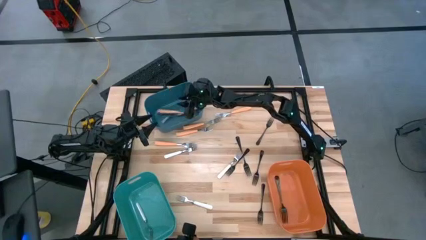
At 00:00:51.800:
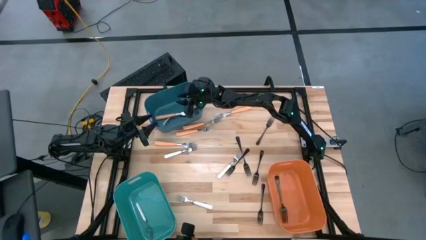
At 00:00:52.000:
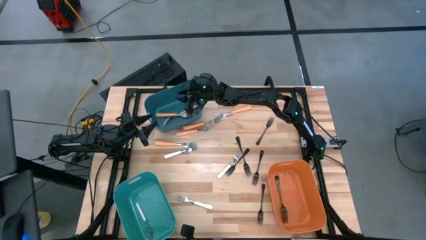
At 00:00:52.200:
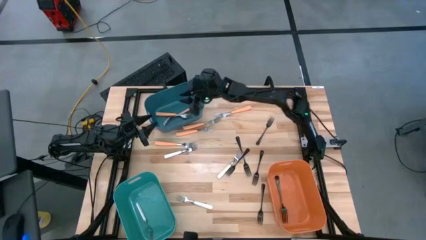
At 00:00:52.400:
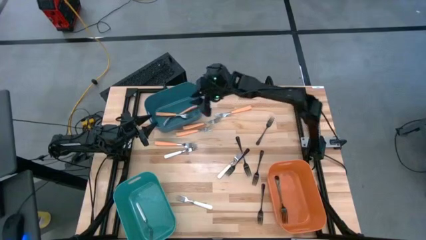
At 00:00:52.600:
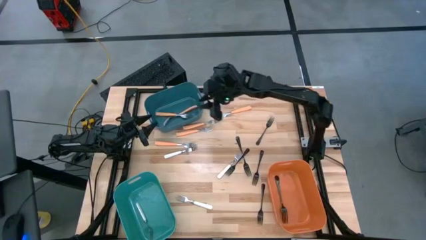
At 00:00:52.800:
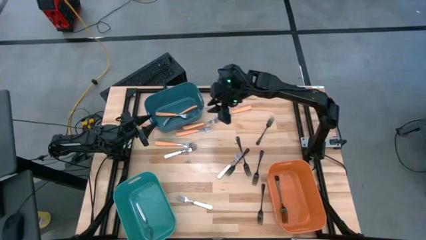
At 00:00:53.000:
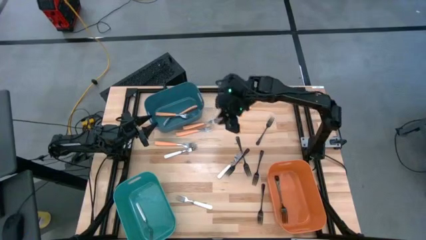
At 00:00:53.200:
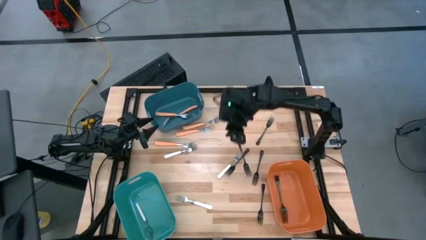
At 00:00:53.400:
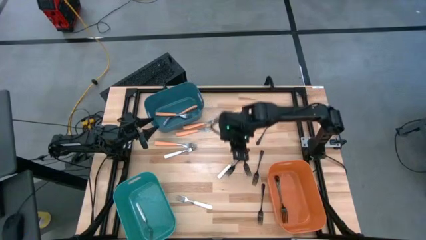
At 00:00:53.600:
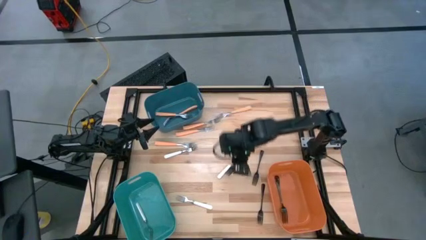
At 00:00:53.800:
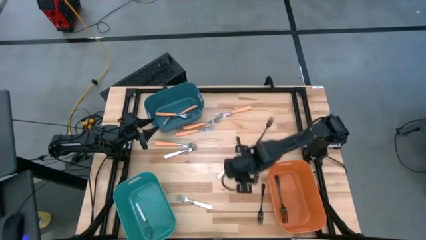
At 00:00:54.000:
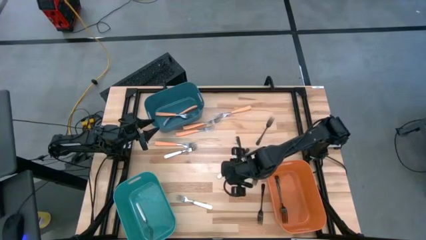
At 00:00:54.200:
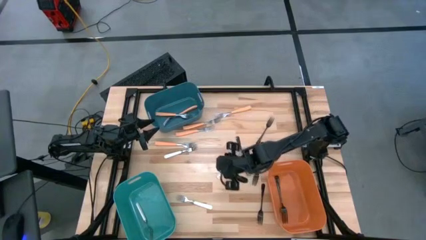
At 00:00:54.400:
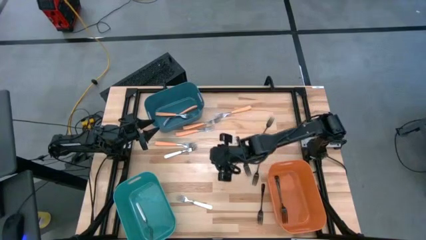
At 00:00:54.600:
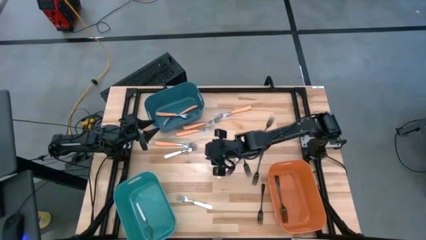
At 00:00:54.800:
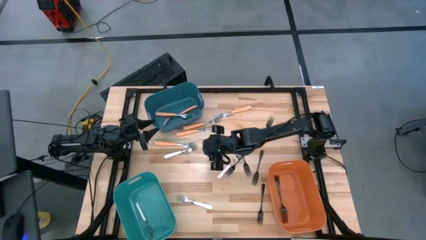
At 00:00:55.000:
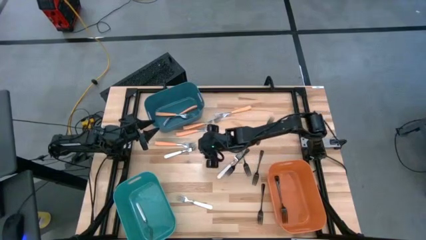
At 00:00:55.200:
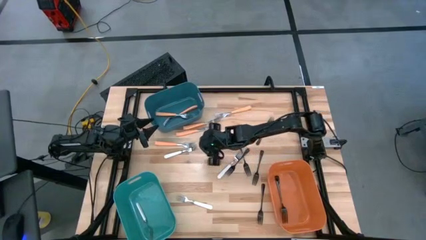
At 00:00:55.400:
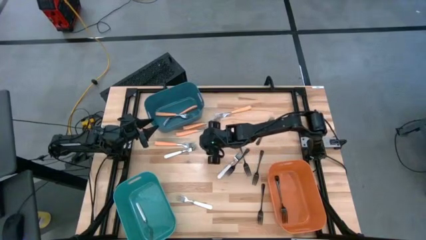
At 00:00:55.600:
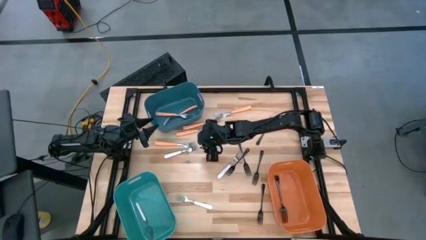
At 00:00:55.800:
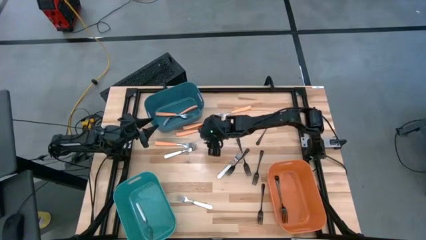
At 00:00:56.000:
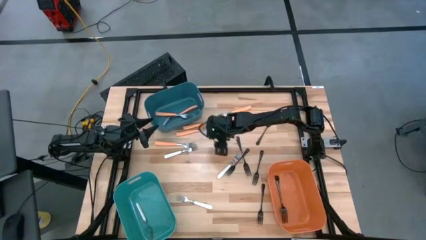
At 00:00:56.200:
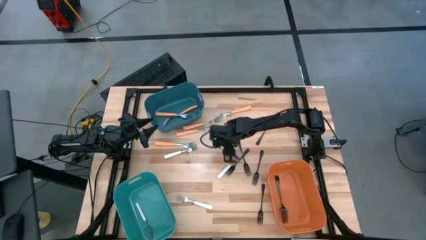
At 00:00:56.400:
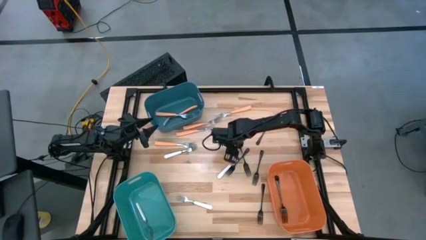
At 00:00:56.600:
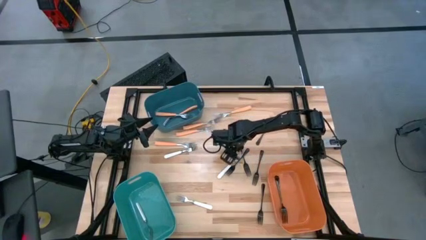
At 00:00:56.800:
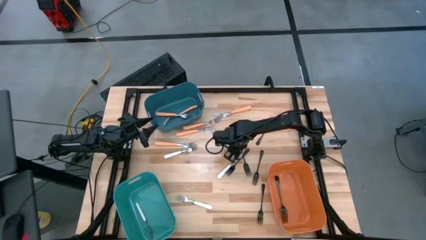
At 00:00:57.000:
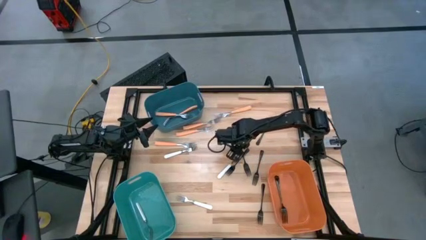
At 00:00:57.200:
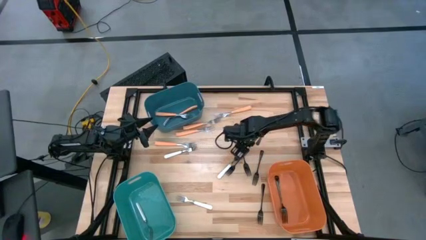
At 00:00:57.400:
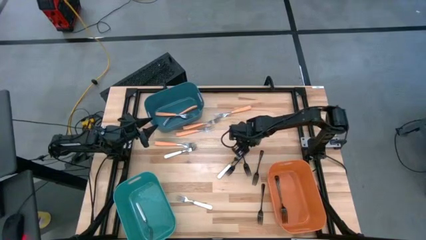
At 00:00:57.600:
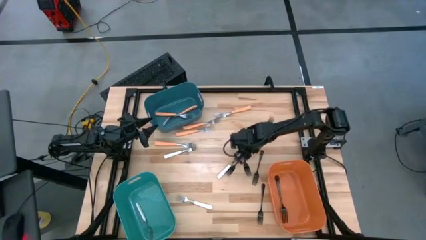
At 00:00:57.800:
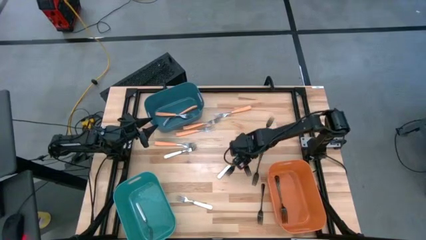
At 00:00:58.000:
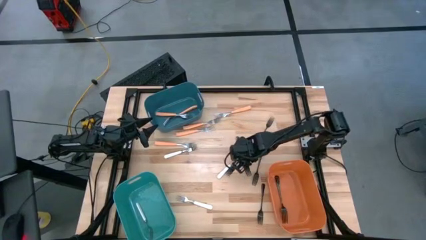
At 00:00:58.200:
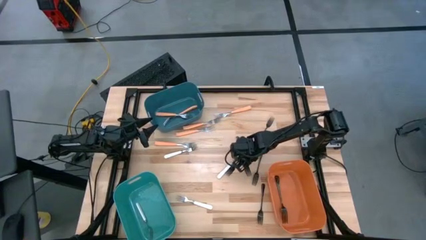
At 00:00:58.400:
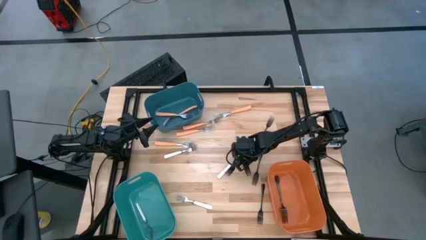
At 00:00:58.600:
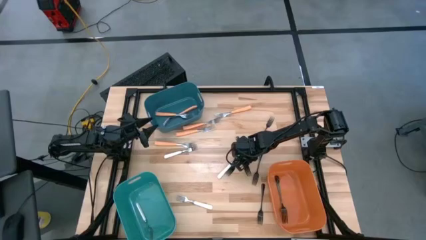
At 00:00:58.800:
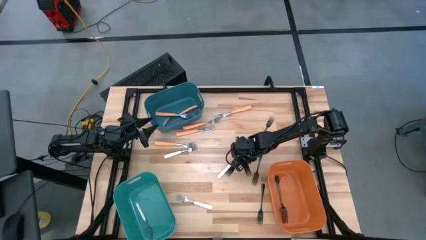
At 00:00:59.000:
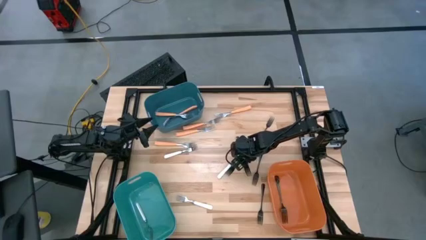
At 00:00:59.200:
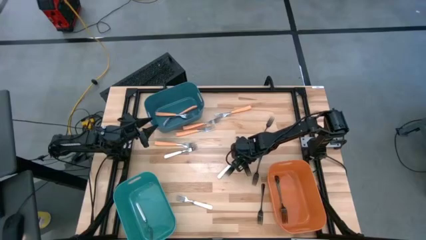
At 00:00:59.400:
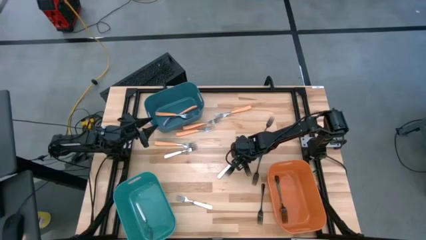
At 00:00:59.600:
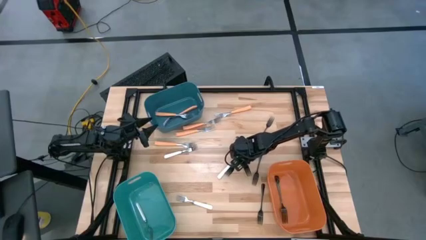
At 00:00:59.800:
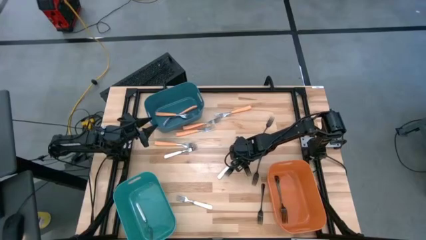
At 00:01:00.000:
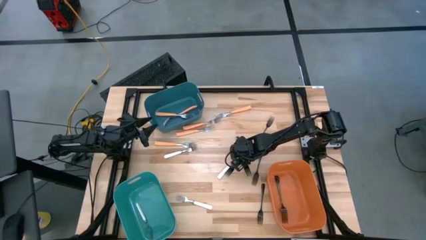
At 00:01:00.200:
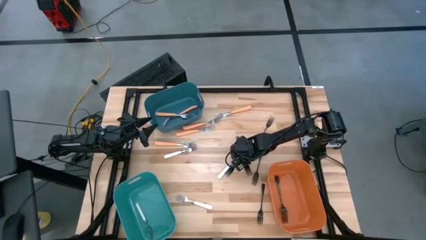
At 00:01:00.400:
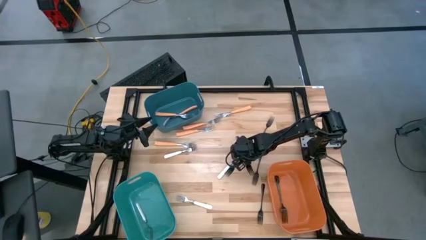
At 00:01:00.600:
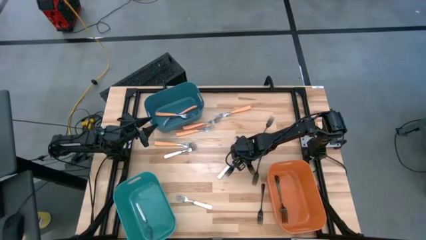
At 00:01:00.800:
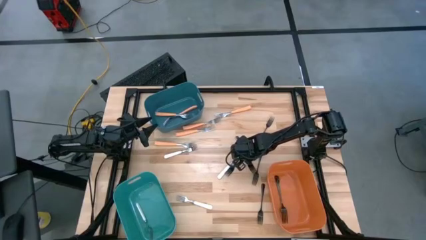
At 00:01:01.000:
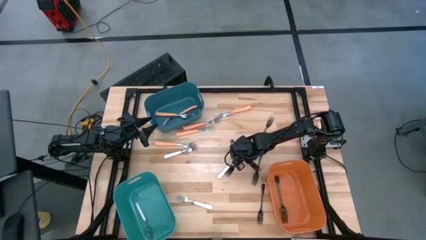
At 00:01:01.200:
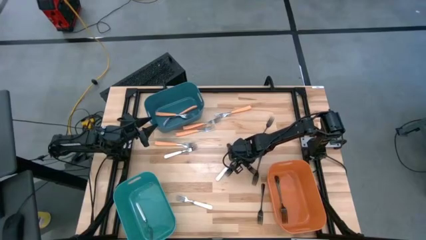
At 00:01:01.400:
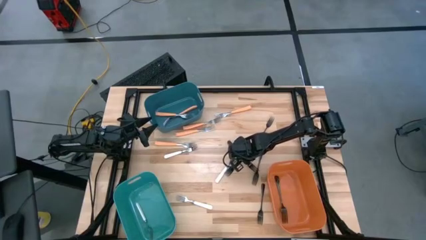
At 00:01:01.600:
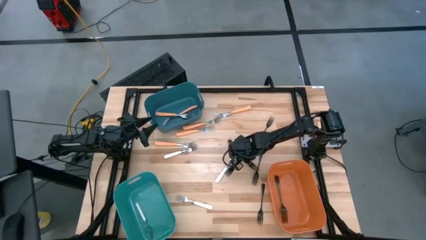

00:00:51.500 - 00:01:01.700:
Task: Sort silverware by color (type)
Put the black fork into the orange bin
